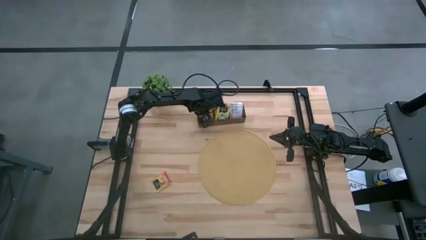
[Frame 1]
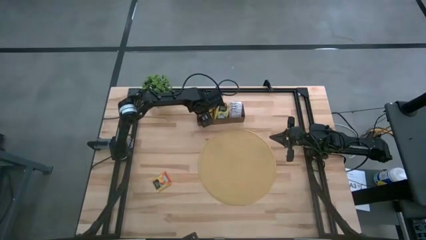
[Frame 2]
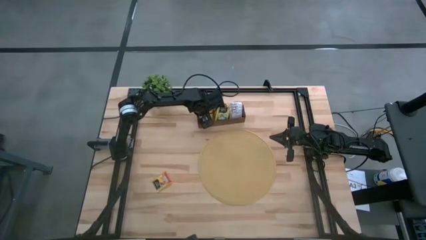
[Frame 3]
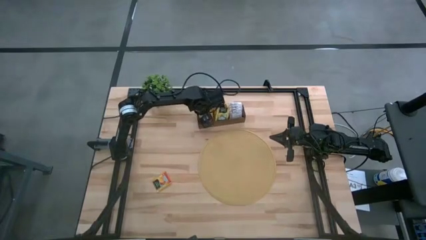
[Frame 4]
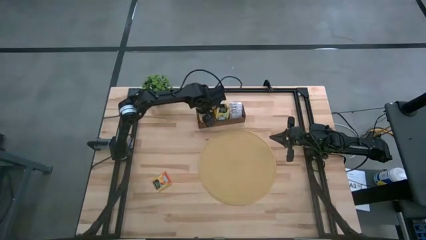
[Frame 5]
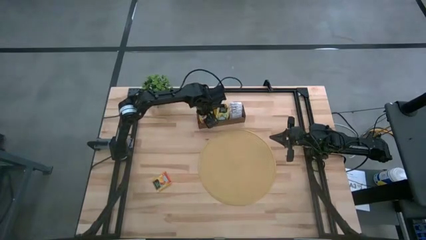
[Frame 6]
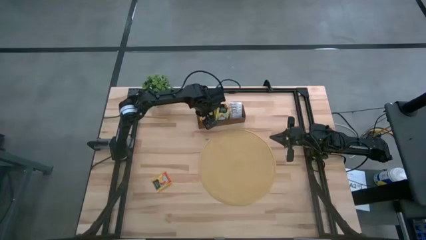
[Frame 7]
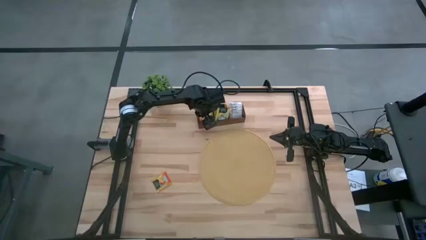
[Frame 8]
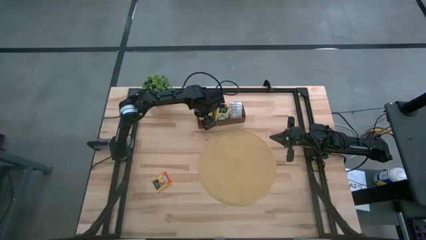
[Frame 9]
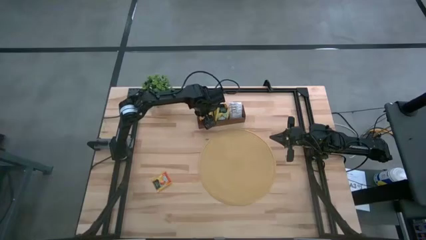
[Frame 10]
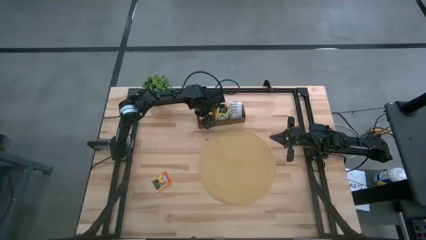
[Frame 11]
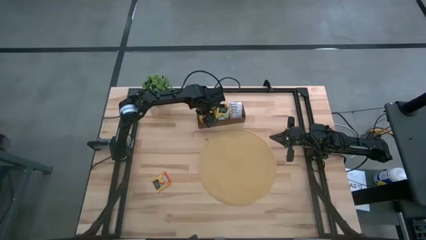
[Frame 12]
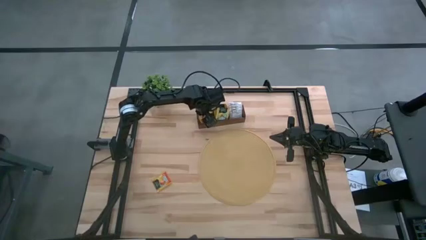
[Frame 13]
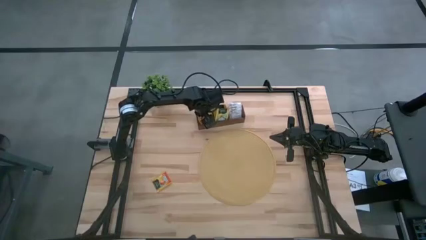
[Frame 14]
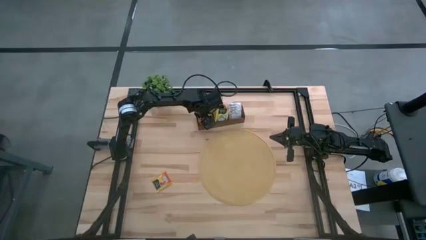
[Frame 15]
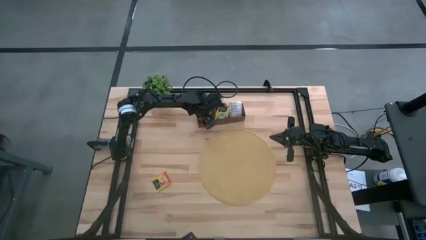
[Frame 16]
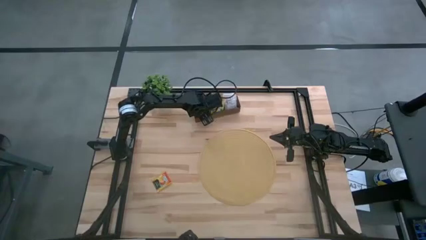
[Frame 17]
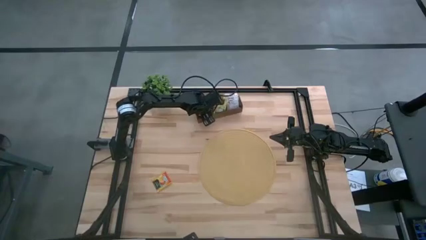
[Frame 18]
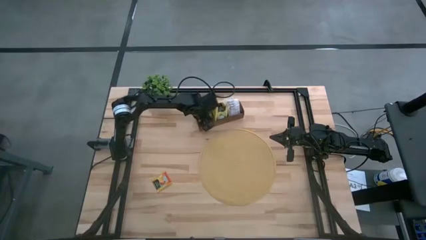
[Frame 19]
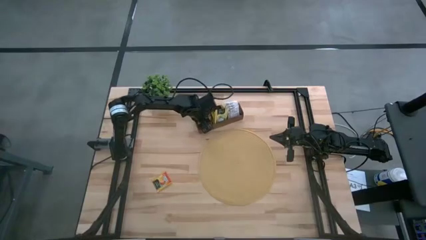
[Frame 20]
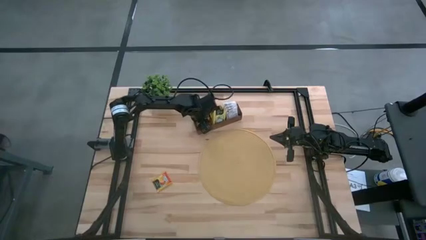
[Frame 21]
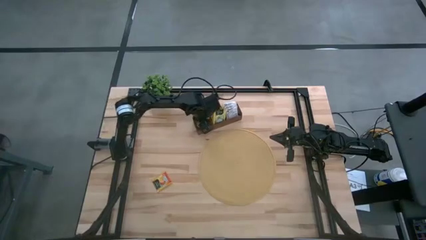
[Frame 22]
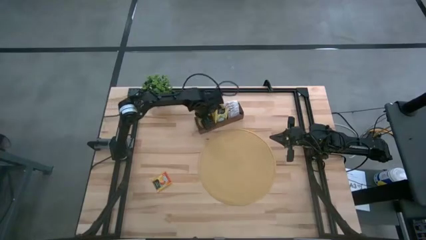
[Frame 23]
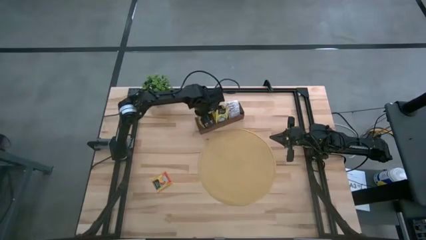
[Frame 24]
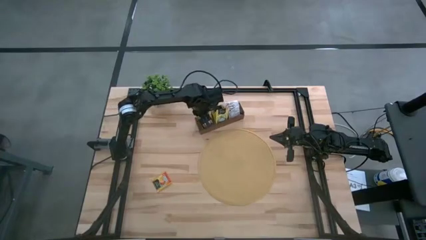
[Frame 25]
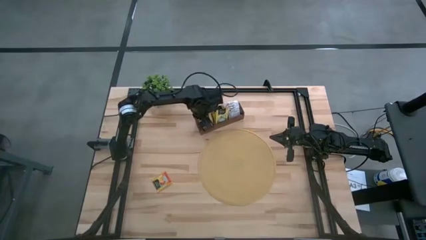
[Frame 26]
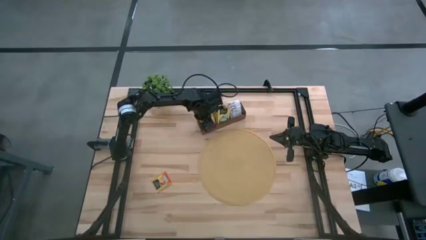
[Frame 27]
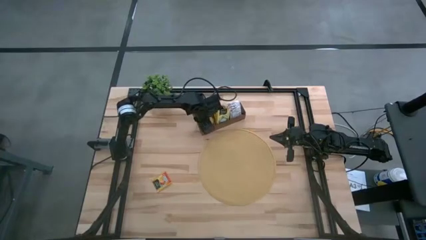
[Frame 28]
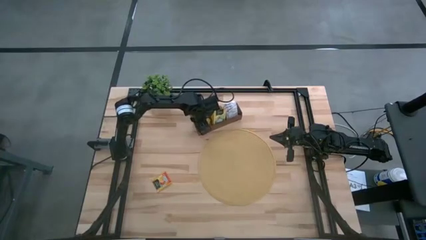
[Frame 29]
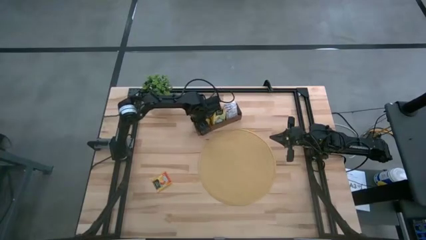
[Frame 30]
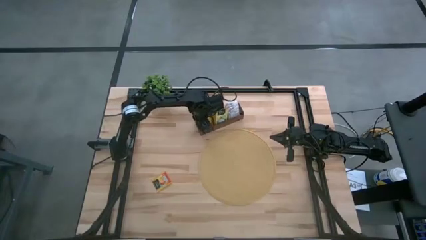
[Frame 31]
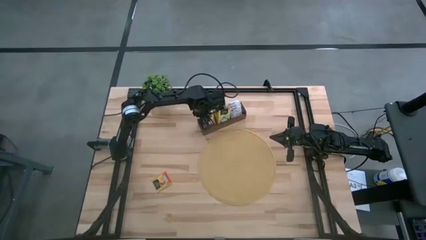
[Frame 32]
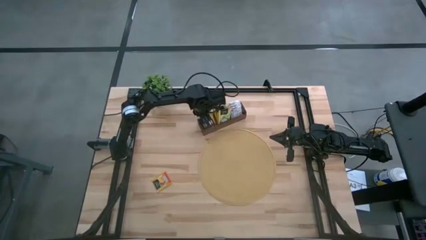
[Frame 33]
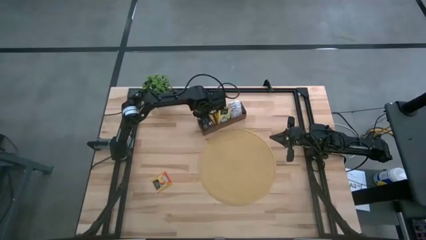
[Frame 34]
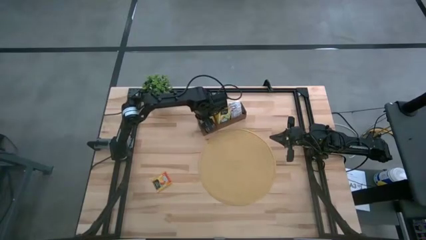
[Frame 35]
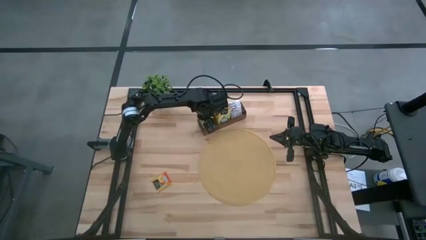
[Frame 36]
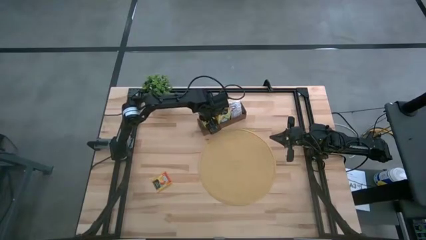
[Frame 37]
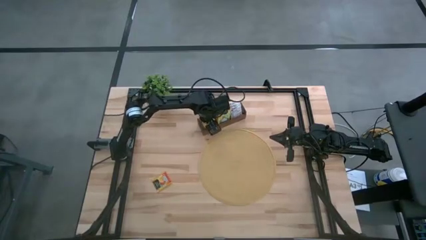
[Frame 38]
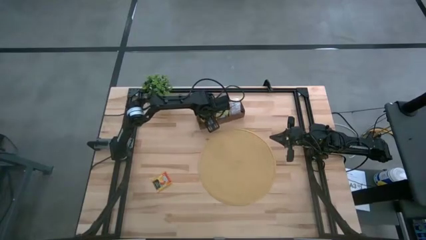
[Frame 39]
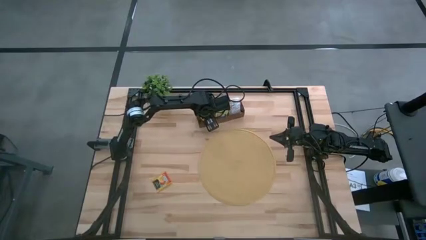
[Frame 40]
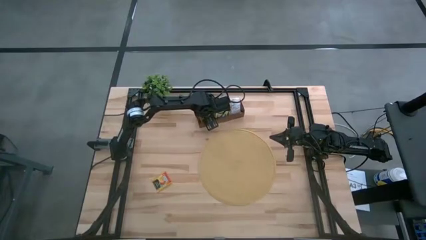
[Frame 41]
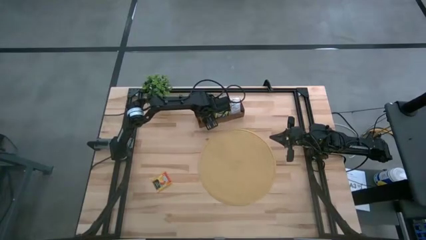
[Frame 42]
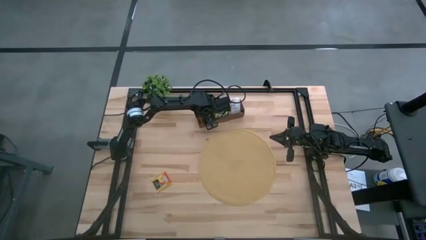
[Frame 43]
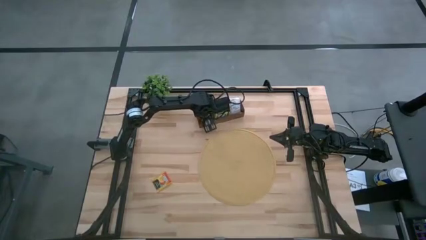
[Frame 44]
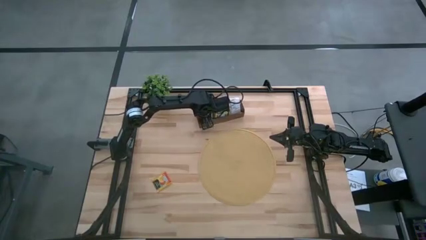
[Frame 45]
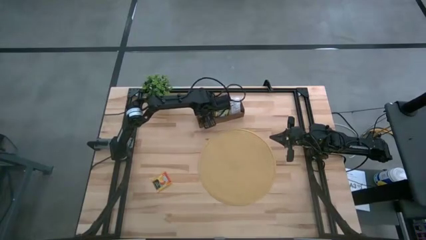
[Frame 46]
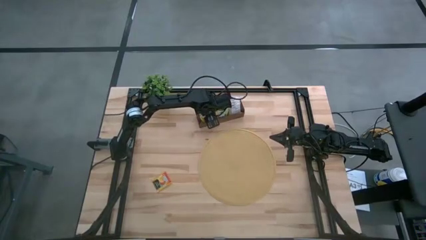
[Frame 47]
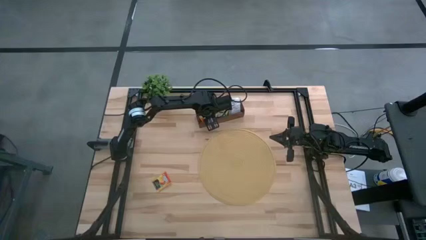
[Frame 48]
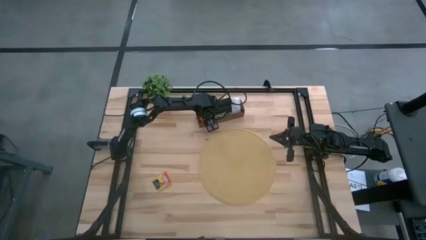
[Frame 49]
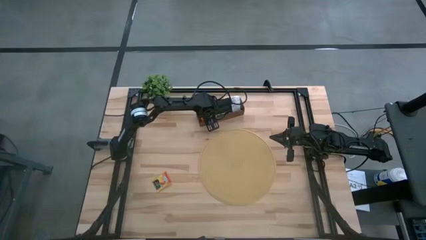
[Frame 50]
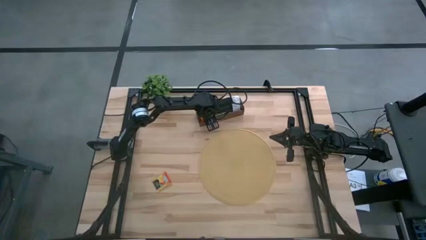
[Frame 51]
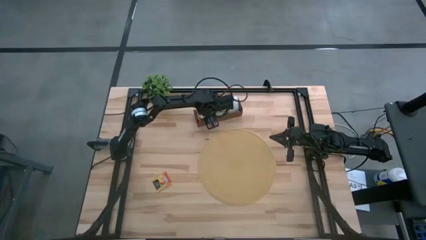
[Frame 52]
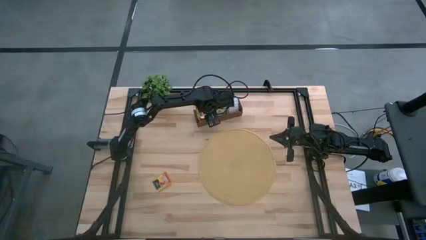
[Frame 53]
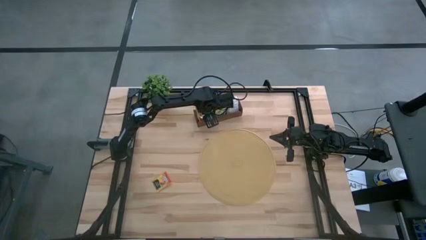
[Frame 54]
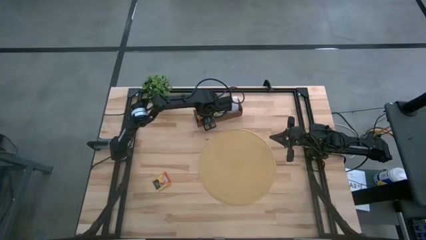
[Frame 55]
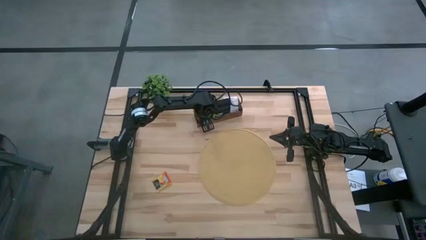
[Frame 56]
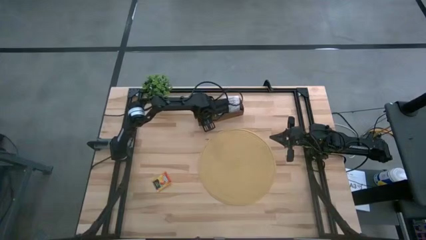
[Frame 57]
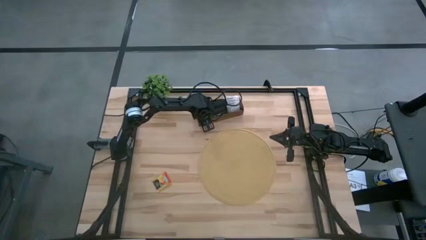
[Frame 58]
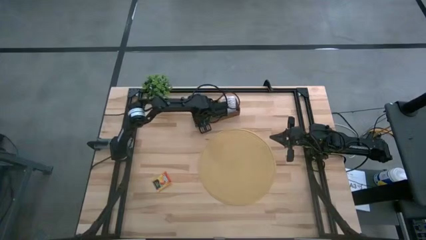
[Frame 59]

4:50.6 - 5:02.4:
Task: Pick & Place Tea
Put the orange tea bag into the left section of the wooden organizer

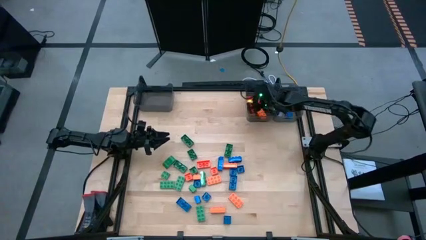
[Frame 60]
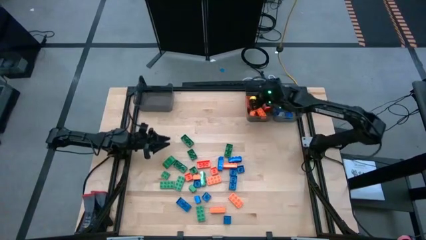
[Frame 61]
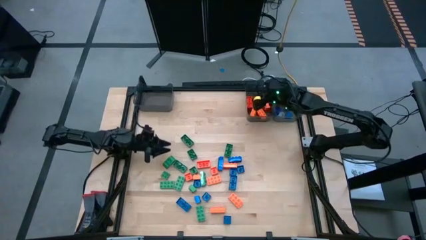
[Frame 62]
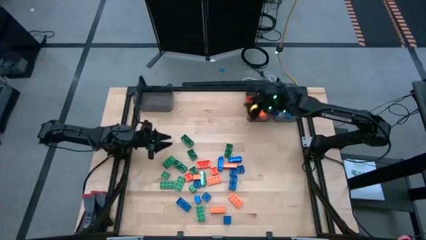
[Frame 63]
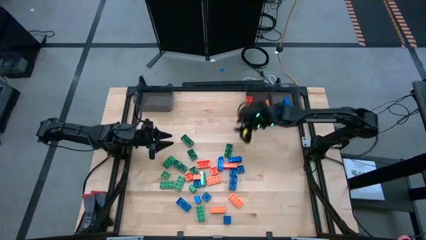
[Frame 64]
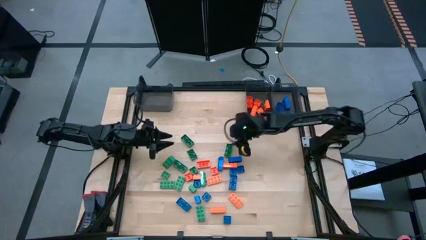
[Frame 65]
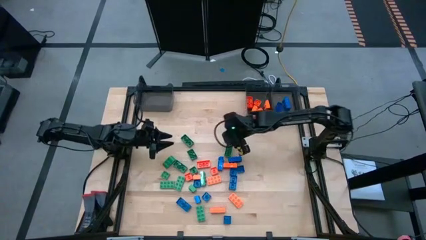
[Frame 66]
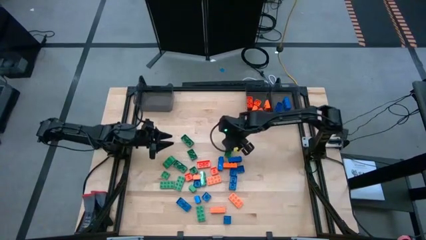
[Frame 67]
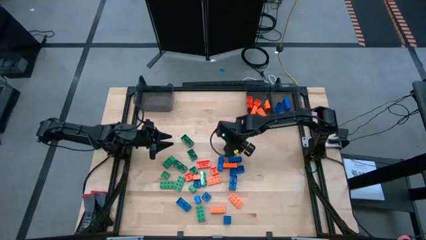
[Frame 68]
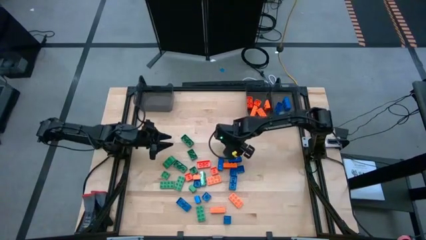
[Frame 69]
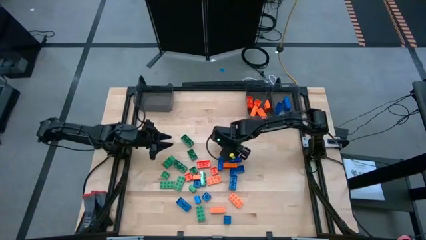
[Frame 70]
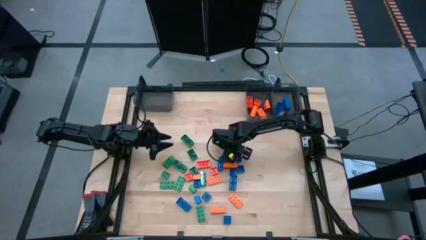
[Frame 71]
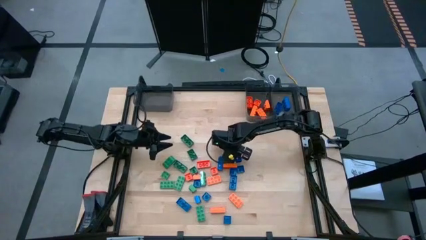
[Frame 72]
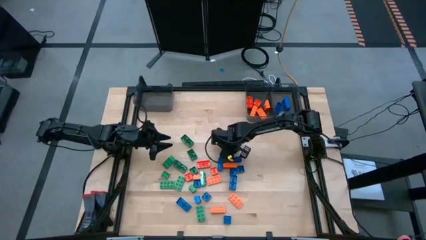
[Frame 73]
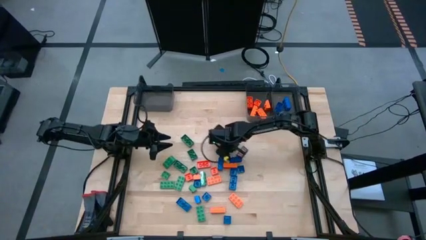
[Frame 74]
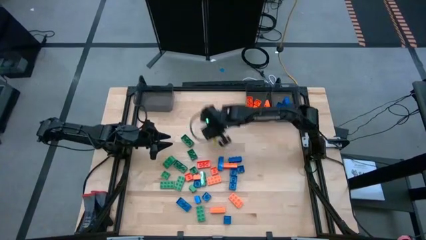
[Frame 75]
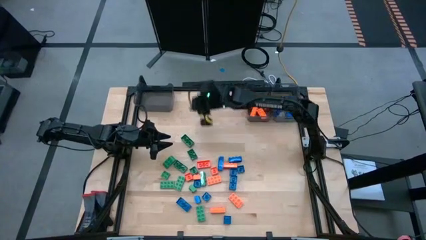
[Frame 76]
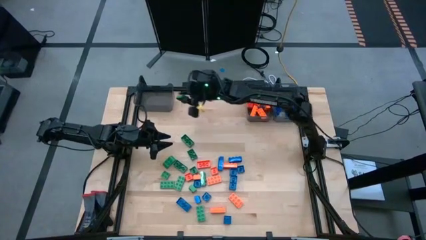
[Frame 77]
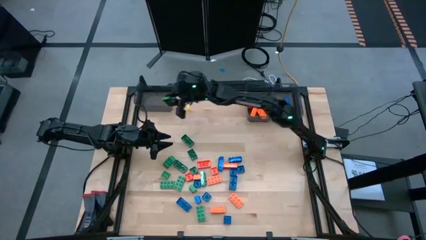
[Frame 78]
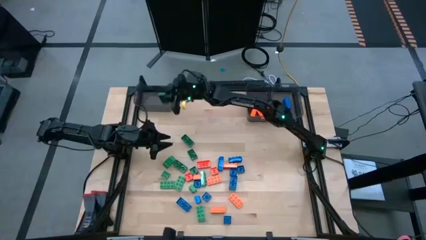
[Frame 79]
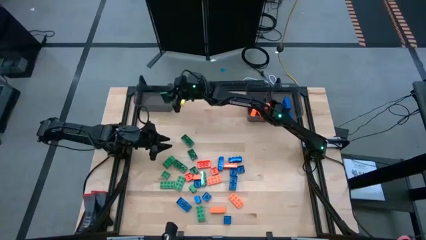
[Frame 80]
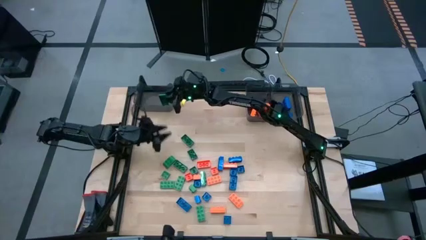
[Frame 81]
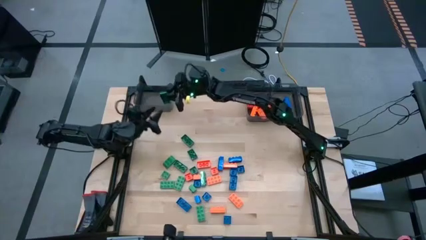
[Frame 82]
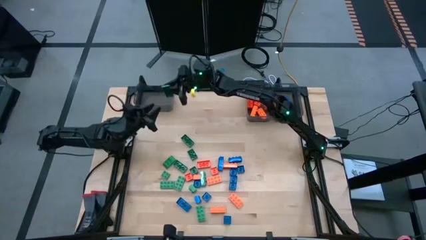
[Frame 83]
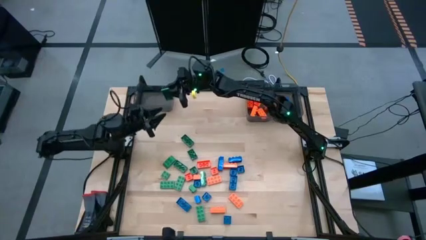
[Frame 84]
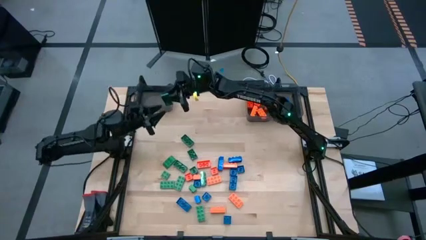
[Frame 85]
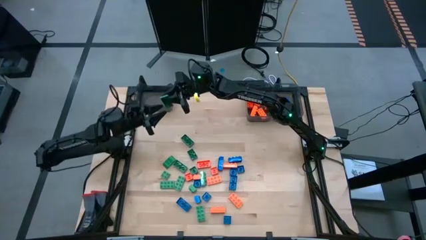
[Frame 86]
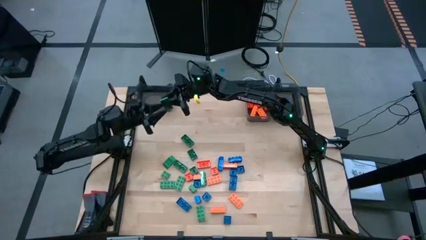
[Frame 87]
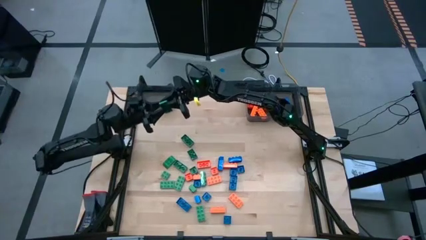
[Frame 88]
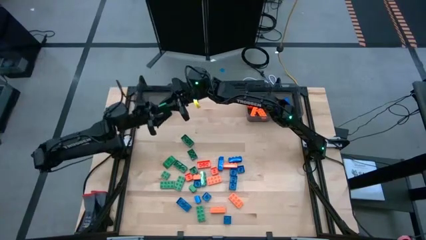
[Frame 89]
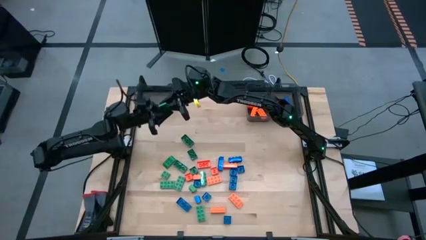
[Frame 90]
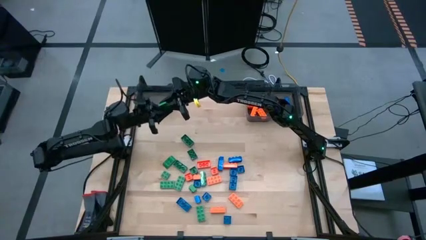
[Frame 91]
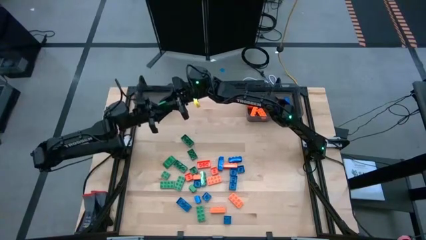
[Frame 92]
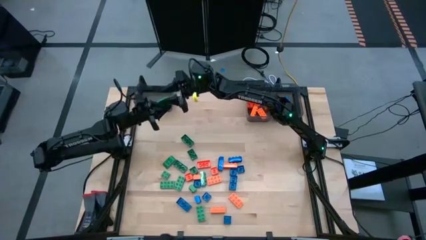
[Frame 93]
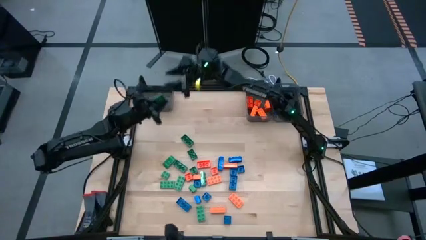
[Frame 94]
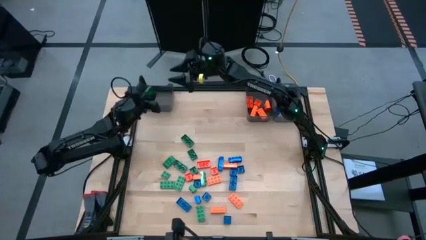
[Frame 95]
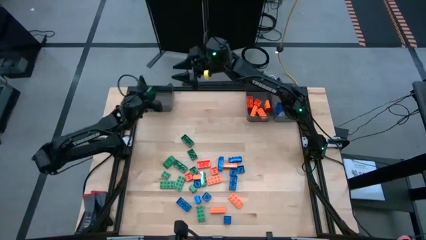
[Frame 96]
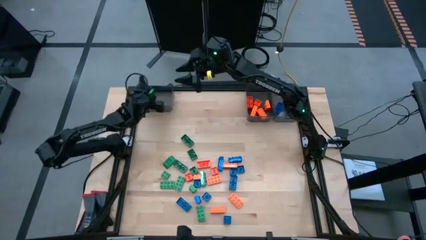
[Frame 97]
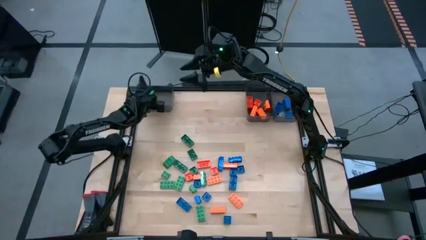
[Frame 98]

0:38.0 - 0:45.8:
Task: Sort blocks
Put the green game piece into the left black bin
